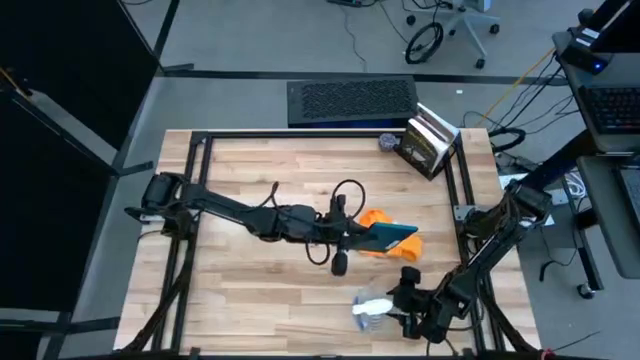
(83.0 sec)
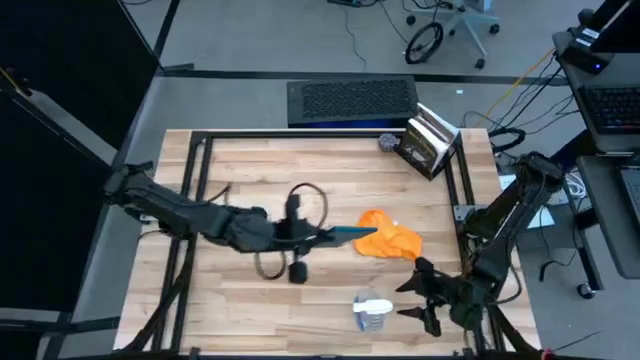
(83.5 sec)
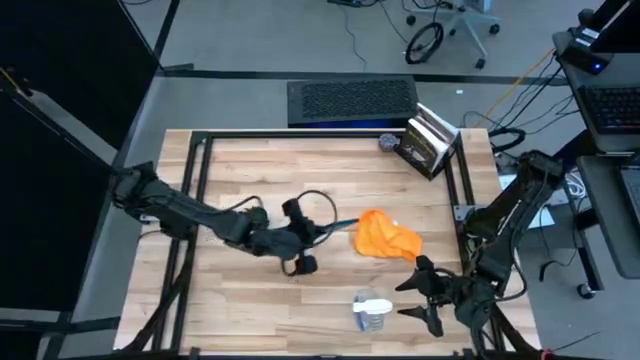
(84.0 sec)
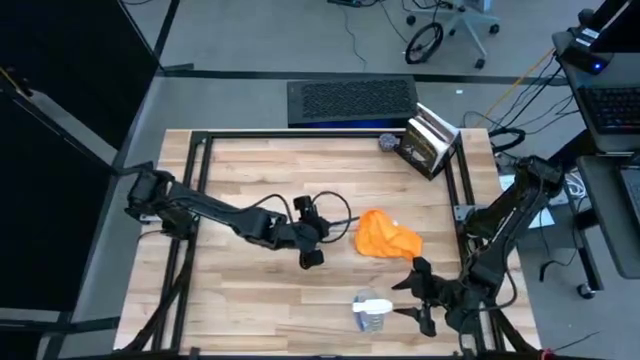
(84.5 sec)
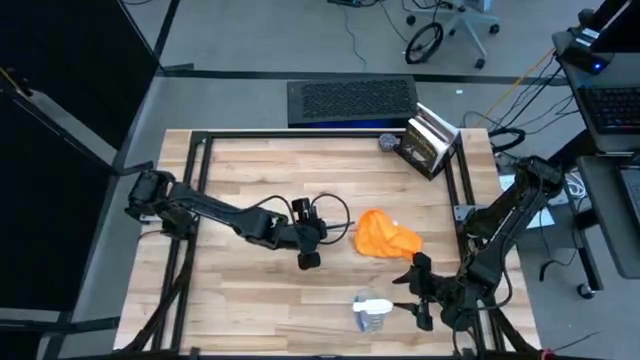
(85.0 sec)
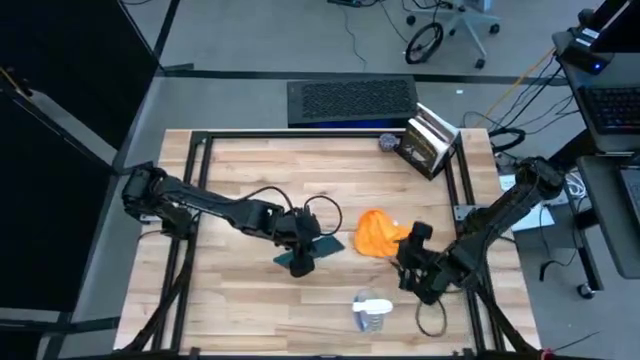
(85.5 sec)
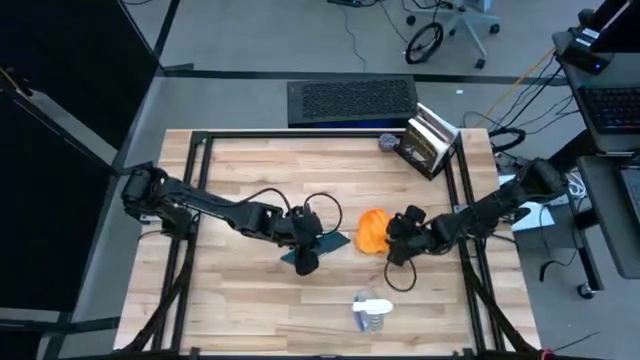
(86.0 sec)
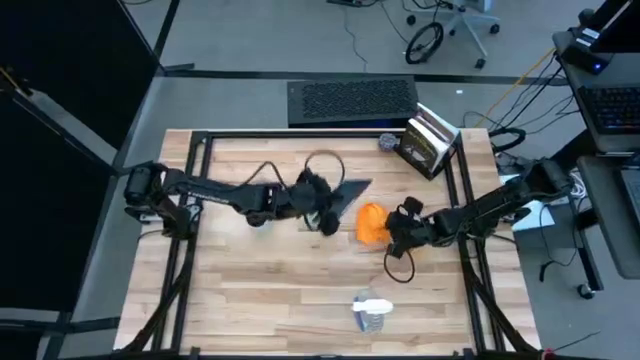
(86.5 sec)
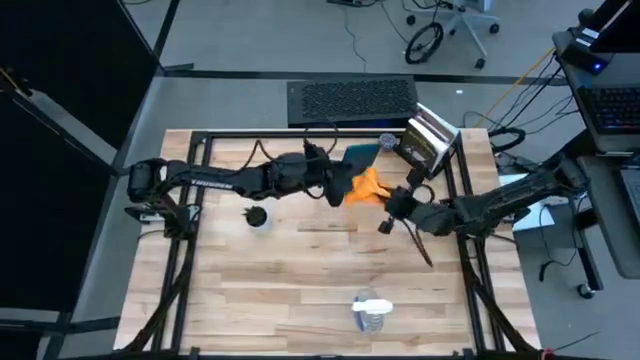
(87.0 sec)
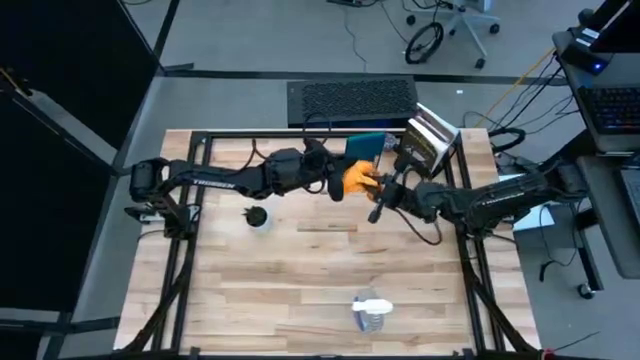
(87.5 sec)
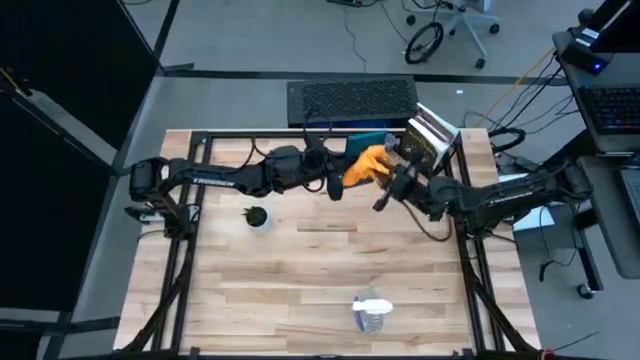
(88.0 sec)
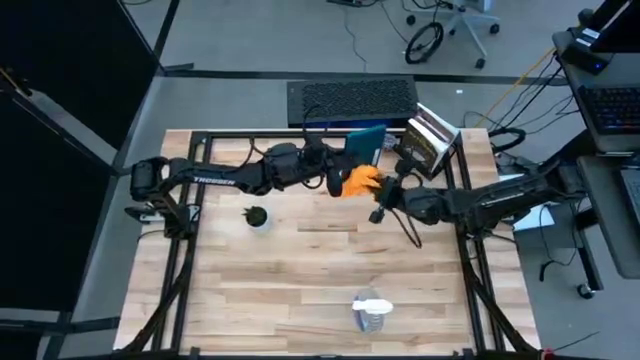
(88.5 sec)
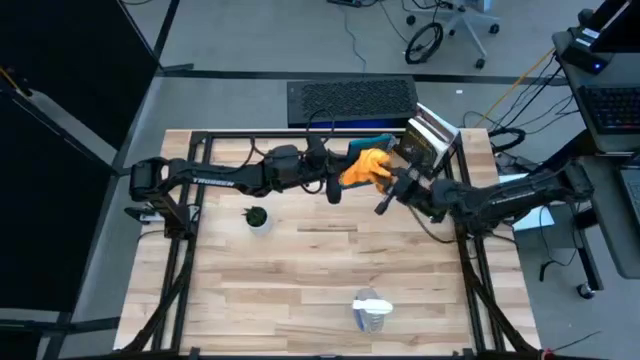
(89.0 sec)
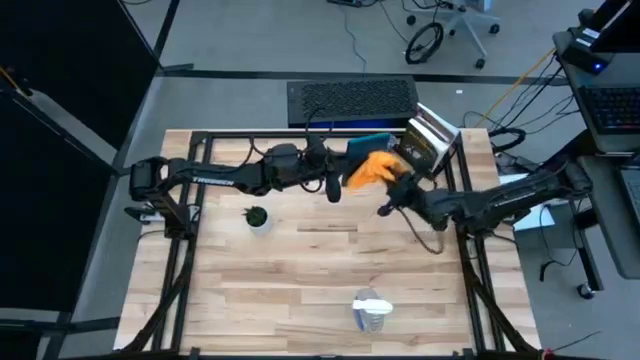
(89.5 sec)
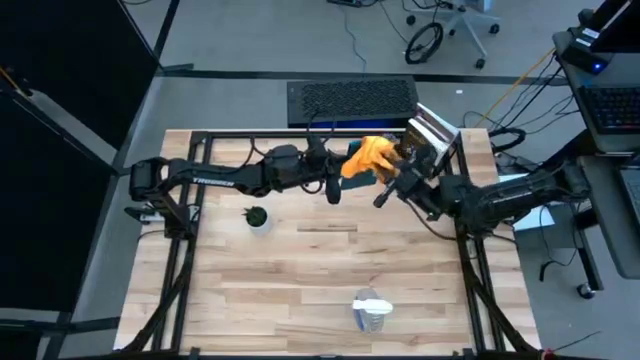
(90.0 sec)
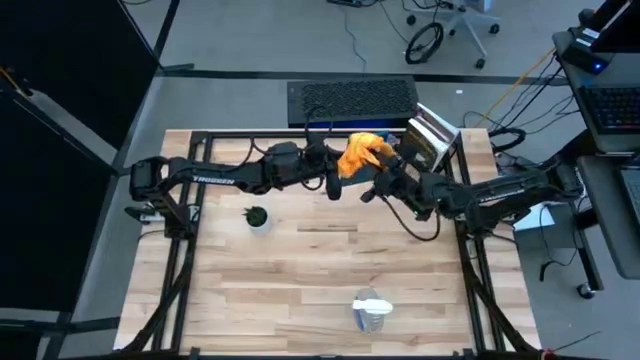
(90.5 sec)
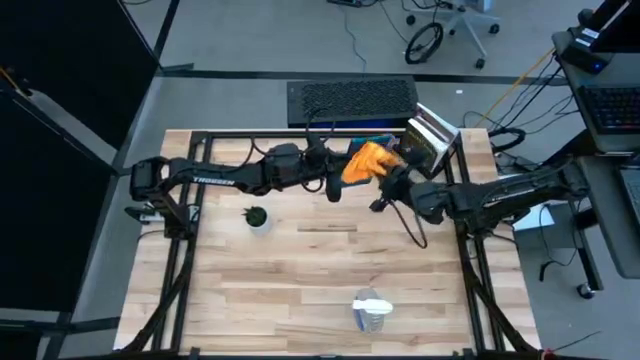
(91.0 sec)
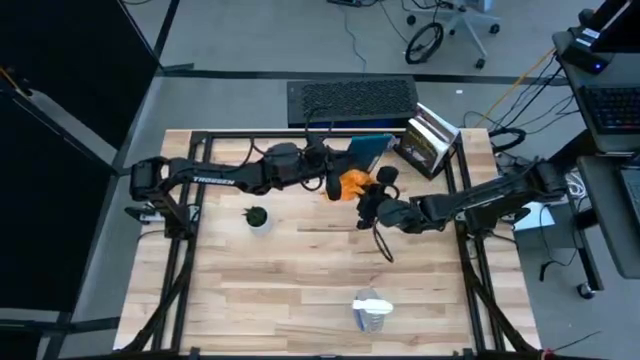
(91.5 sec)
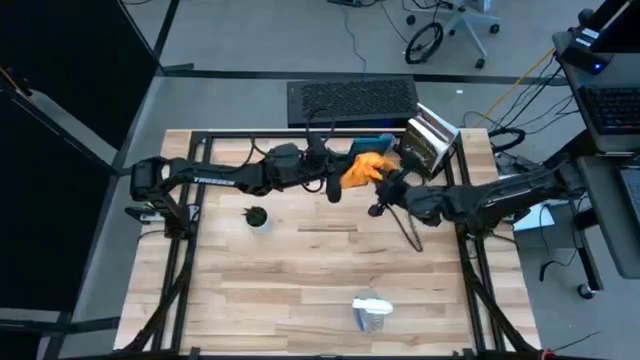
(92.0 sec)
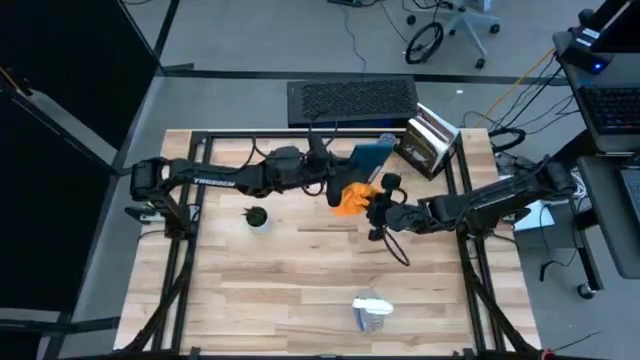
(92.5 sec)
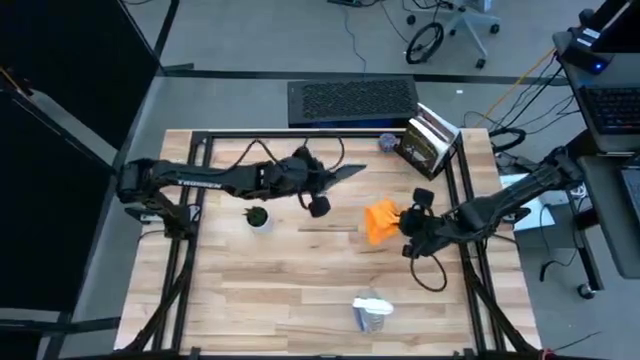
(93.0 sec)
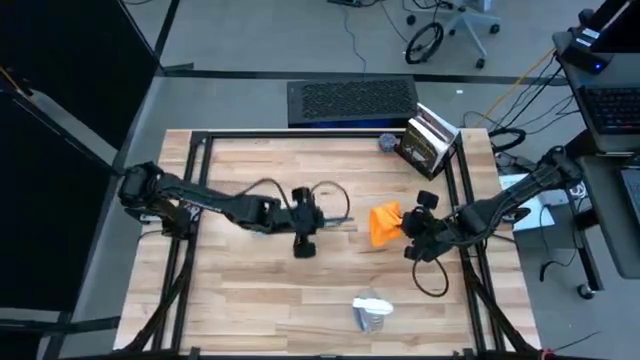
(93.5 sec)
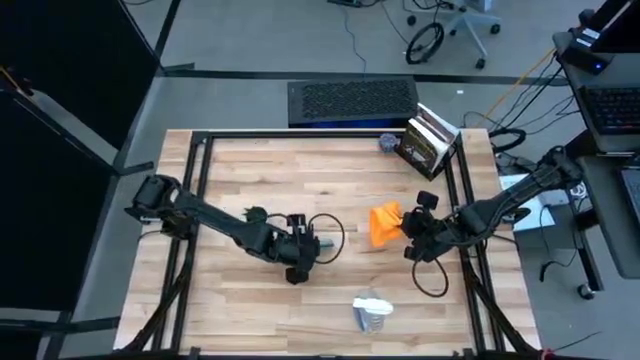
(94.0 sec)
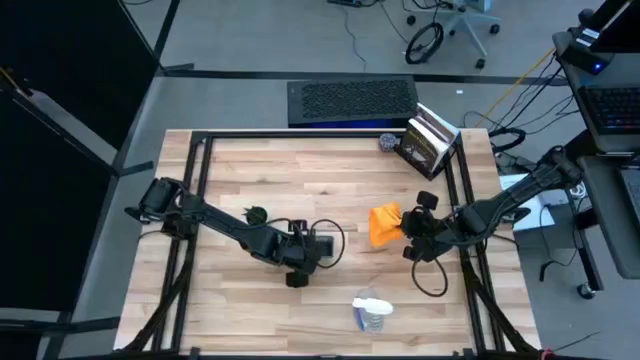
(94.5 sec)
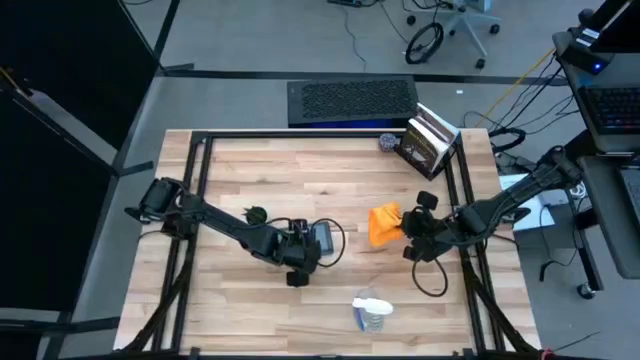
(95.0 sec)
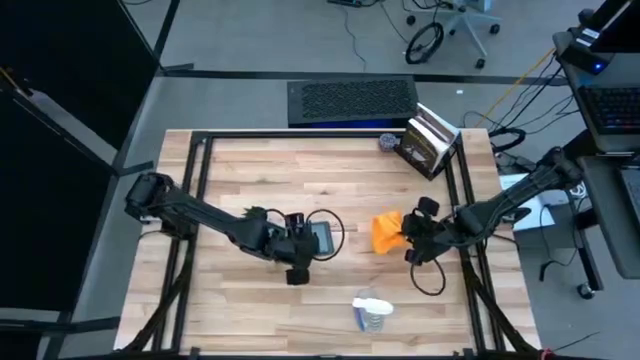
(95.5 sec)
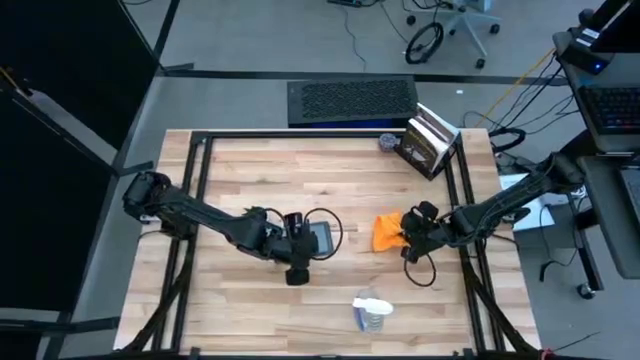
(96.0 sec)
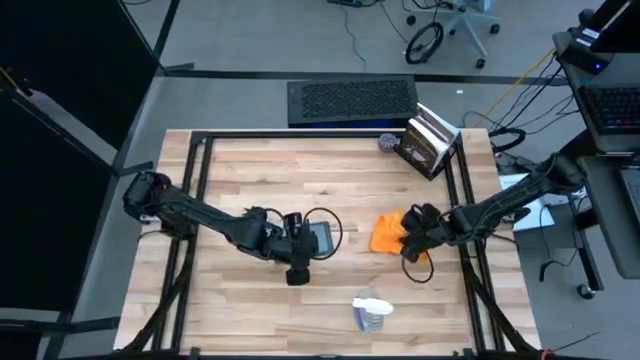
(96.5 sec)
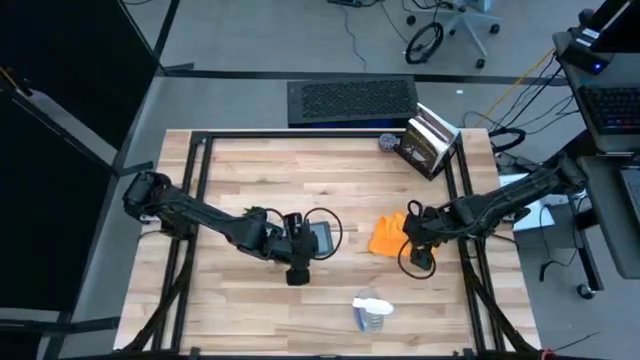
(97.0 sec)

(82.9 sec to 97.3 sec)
Task: Apply microfiber cloth
Wipe the blue tablet with the orange microfiber cloth

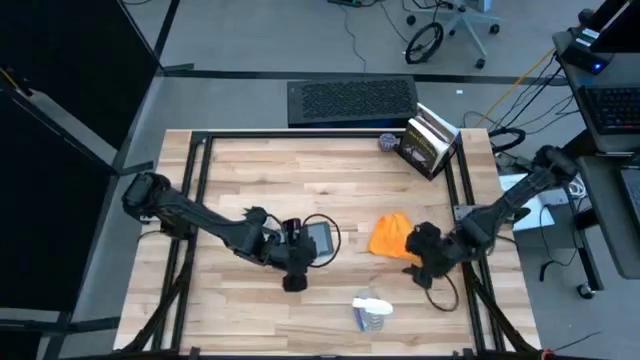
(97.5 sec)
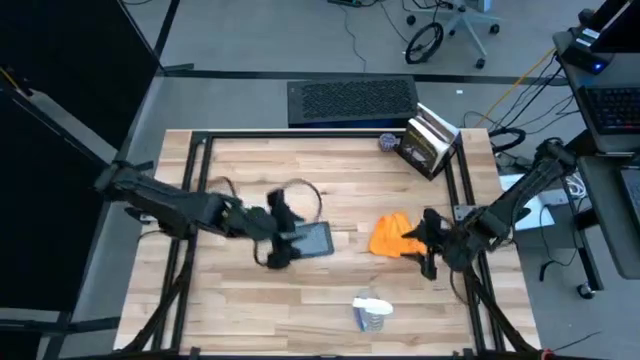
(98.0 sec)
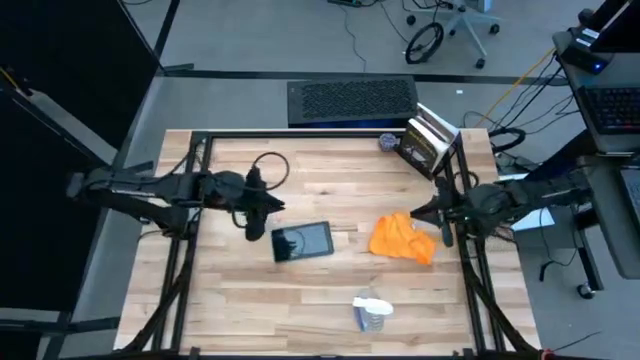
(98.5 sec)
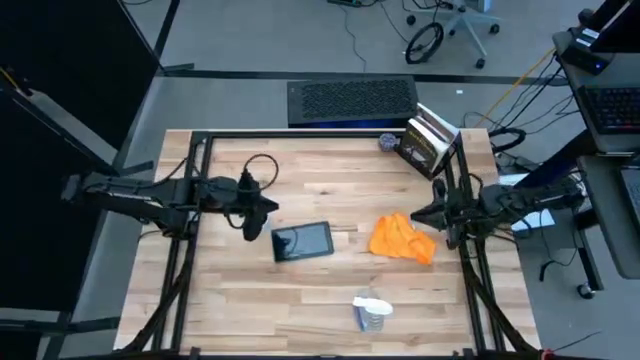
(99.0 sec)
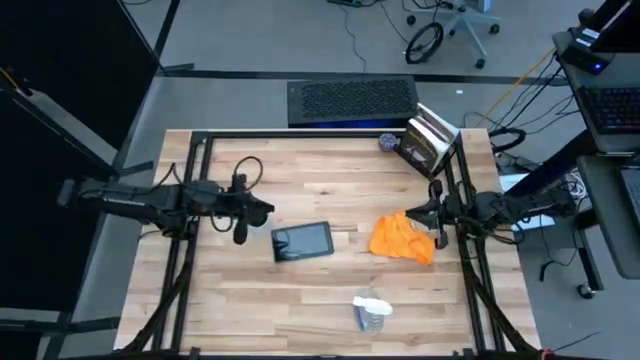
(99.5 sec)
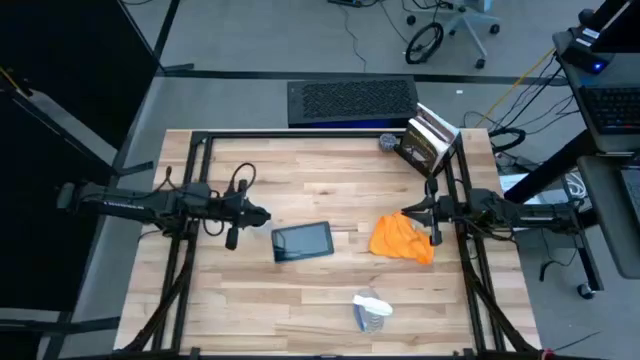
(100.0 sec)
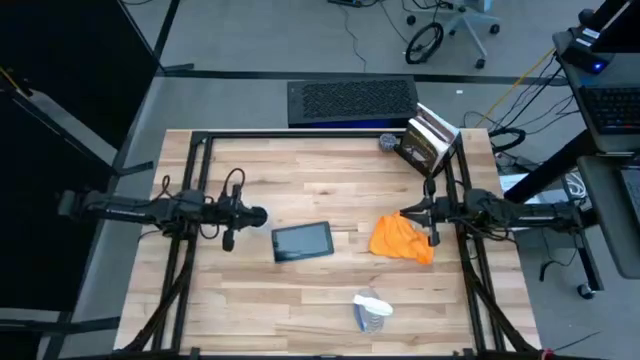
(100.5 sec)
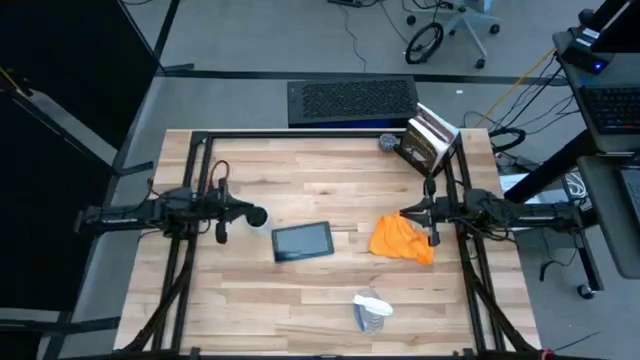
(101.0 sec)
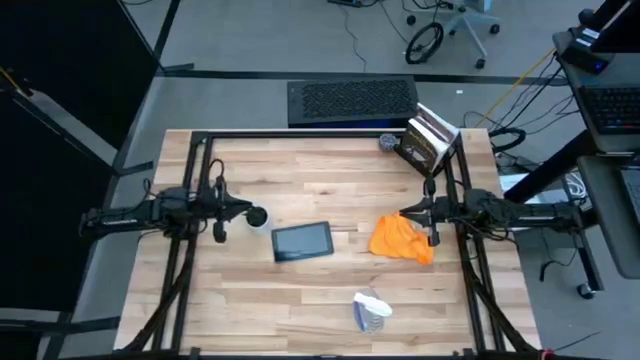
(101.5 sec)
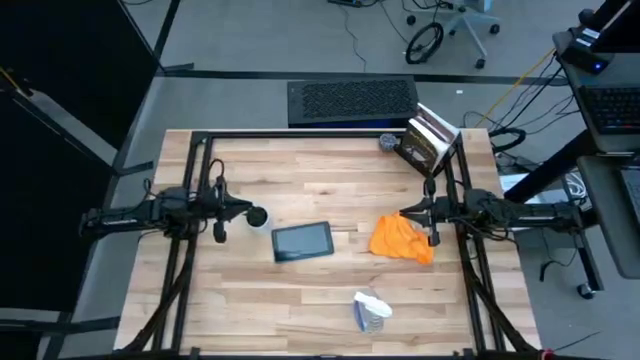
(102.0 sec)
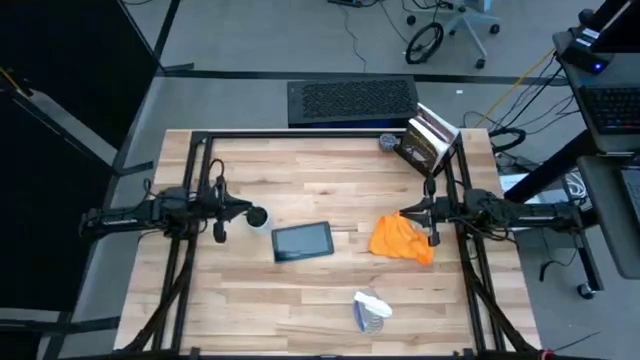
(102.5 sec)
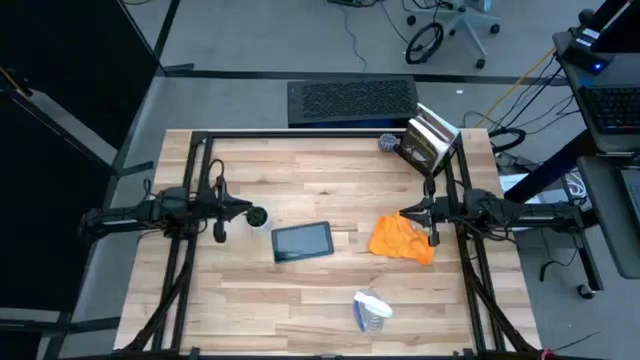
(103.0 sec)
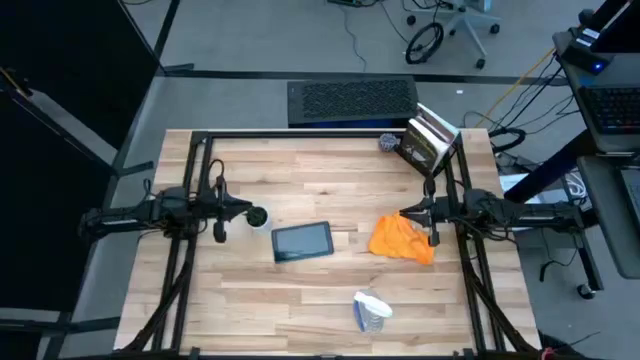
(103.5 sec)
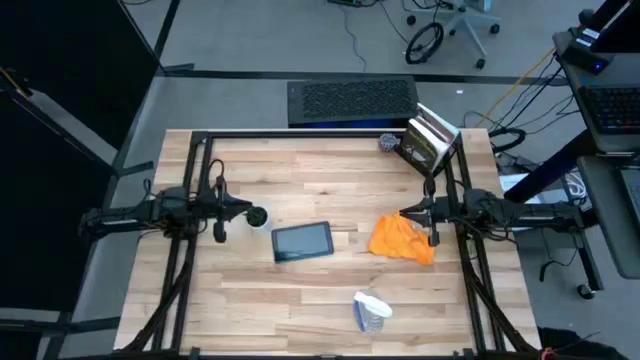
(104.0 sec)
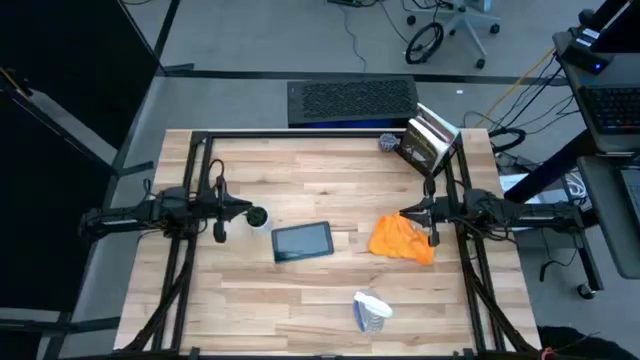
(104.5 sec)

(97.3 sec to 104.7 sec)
Return to Home Position
